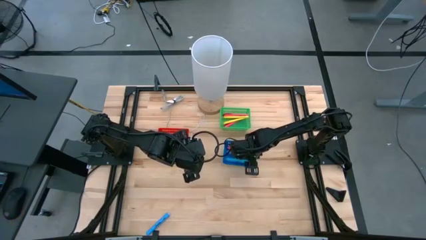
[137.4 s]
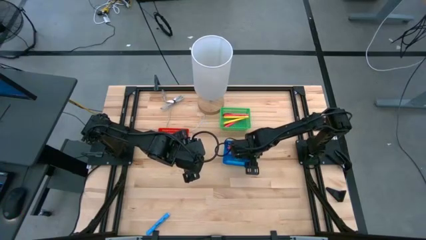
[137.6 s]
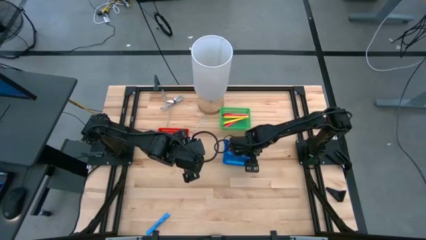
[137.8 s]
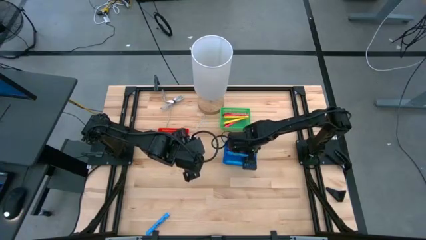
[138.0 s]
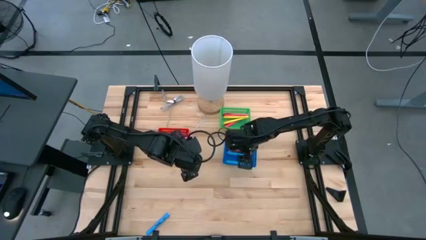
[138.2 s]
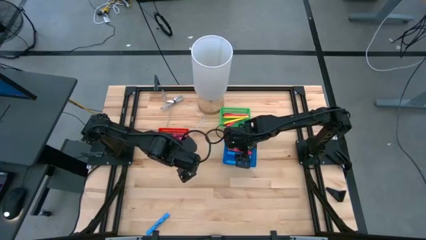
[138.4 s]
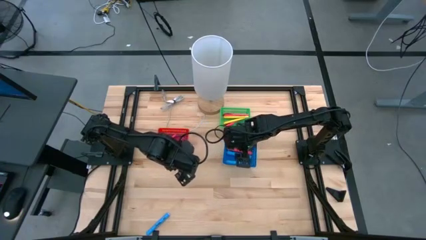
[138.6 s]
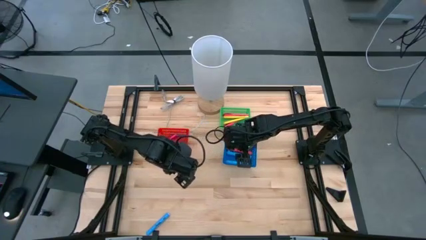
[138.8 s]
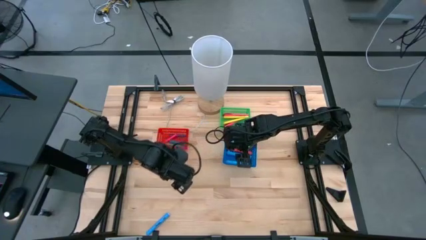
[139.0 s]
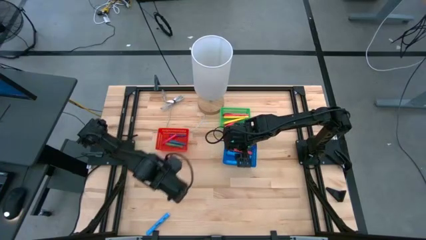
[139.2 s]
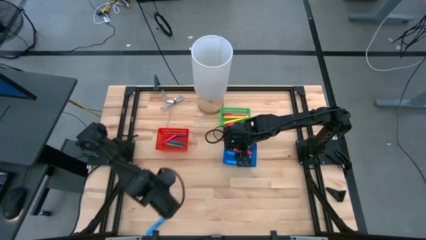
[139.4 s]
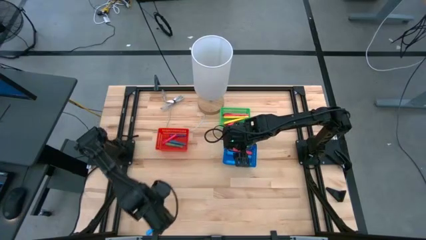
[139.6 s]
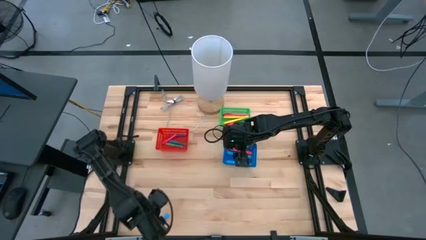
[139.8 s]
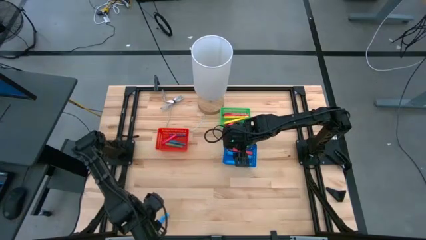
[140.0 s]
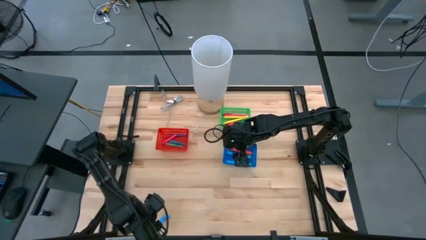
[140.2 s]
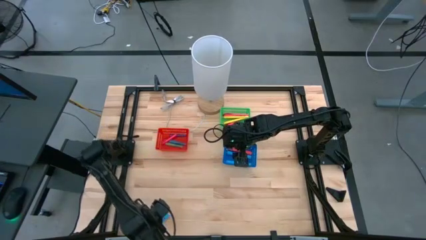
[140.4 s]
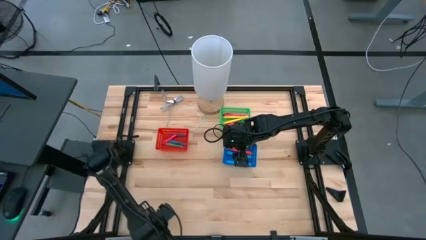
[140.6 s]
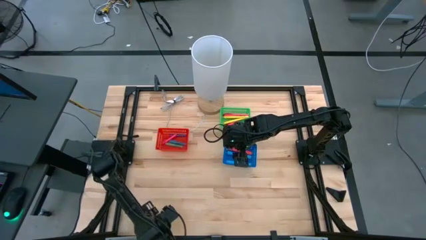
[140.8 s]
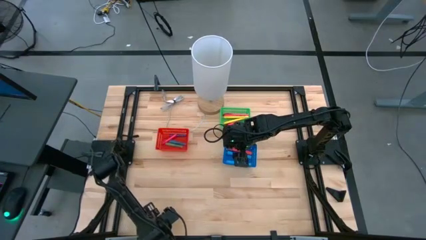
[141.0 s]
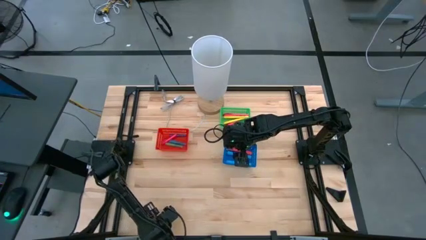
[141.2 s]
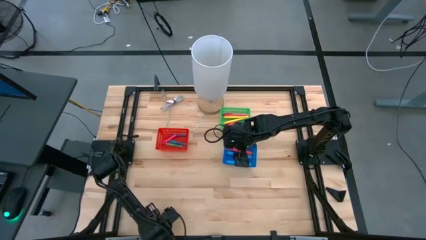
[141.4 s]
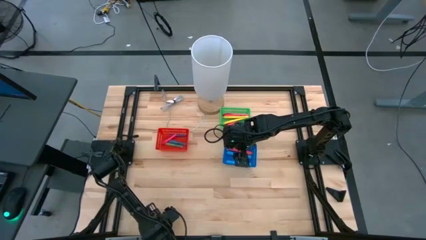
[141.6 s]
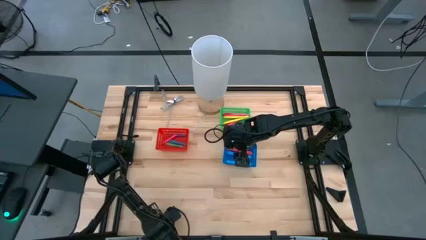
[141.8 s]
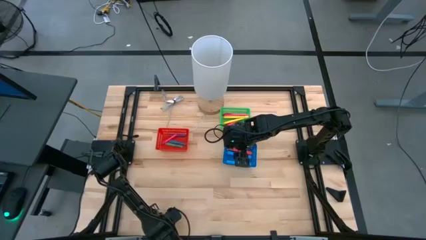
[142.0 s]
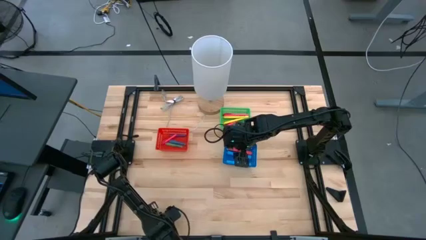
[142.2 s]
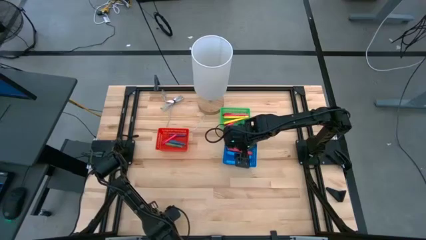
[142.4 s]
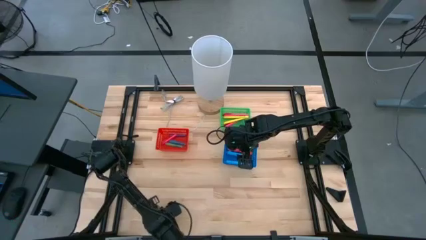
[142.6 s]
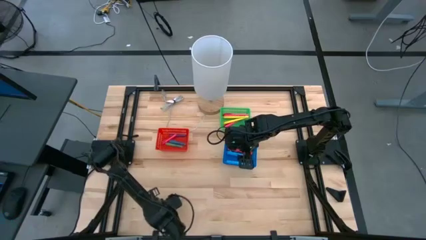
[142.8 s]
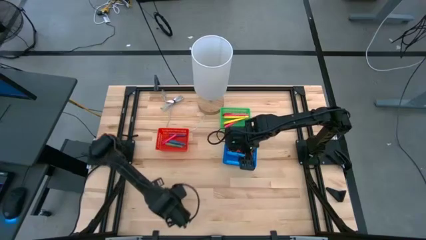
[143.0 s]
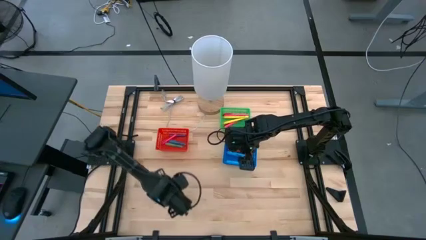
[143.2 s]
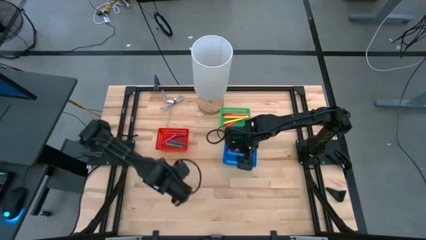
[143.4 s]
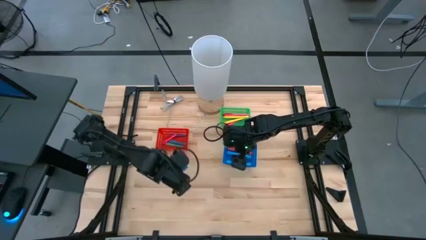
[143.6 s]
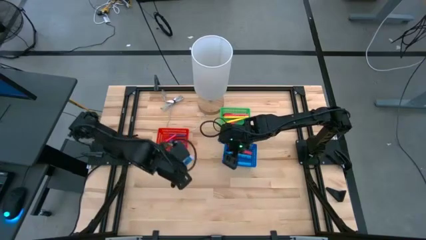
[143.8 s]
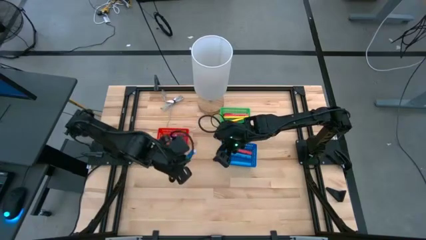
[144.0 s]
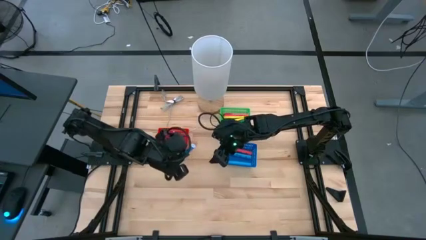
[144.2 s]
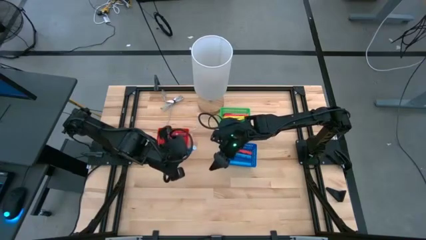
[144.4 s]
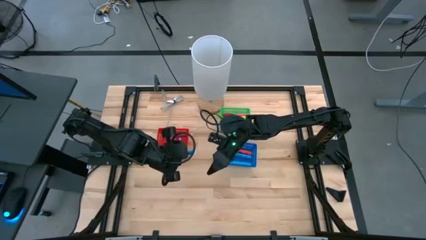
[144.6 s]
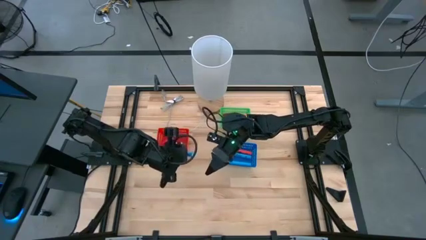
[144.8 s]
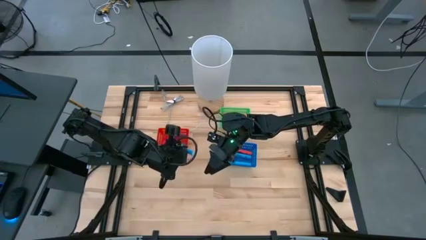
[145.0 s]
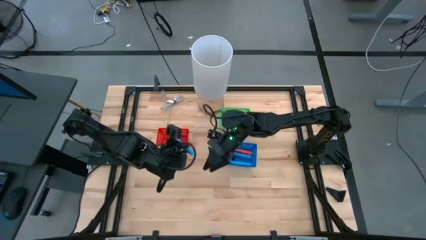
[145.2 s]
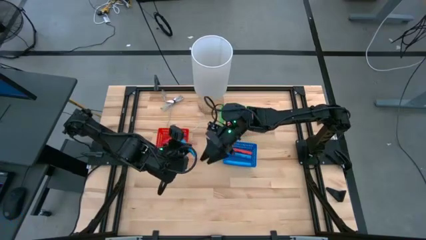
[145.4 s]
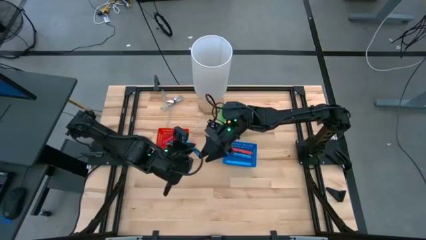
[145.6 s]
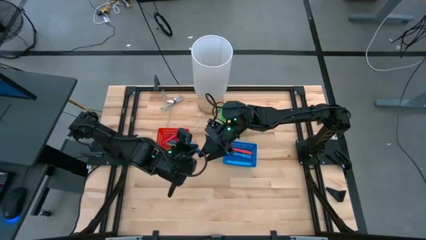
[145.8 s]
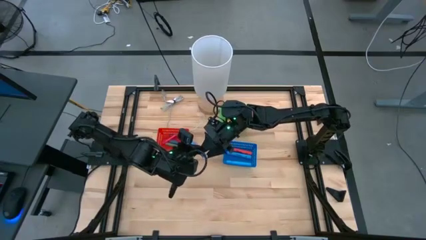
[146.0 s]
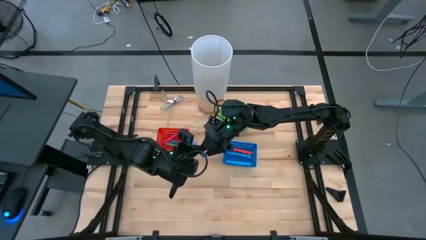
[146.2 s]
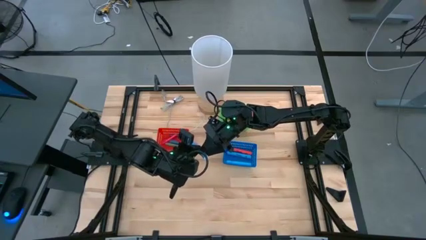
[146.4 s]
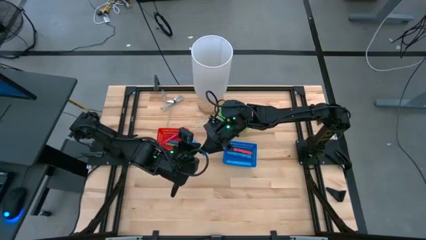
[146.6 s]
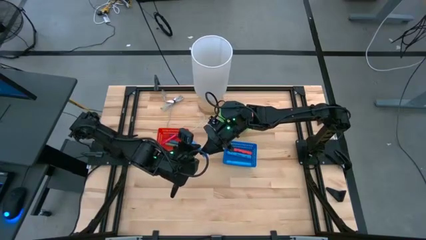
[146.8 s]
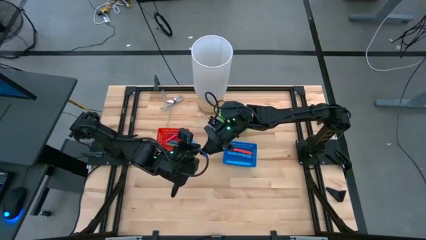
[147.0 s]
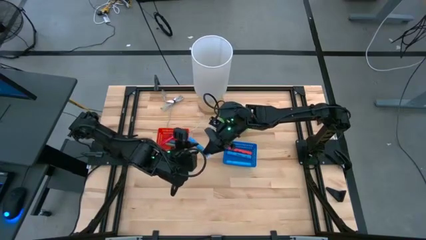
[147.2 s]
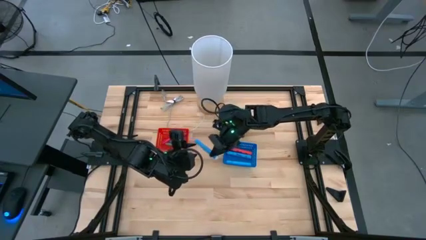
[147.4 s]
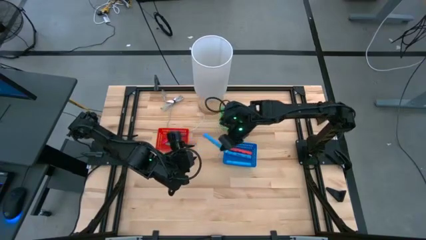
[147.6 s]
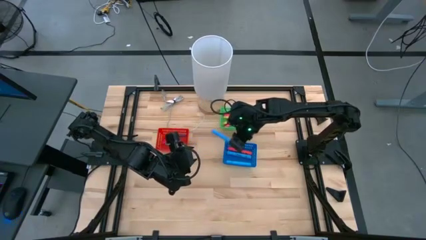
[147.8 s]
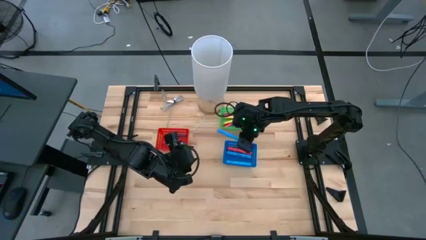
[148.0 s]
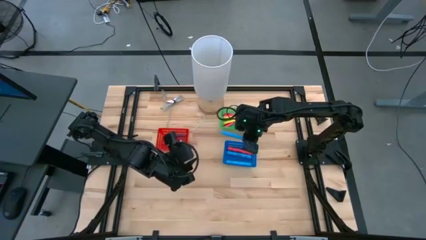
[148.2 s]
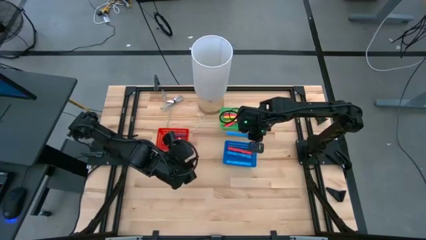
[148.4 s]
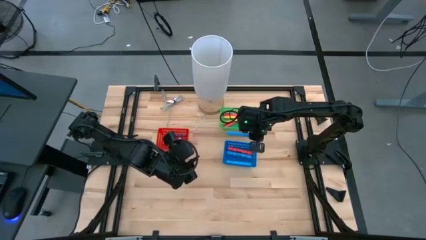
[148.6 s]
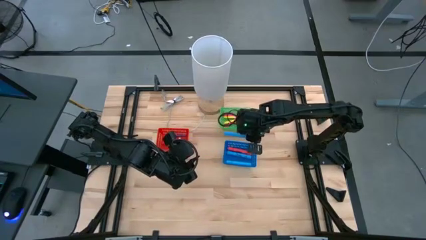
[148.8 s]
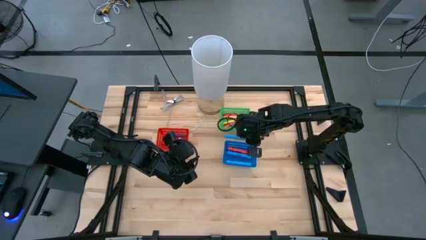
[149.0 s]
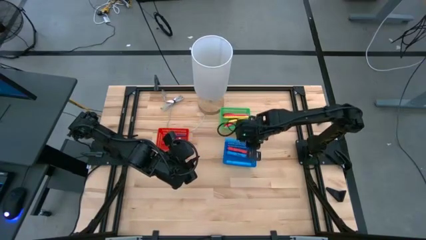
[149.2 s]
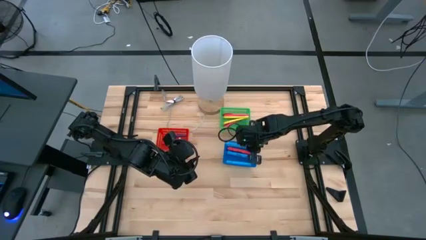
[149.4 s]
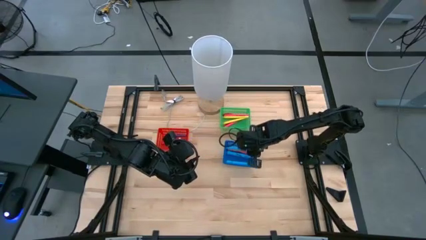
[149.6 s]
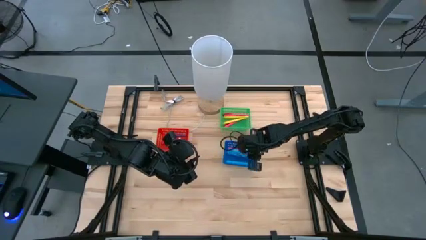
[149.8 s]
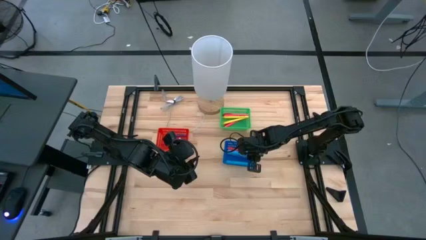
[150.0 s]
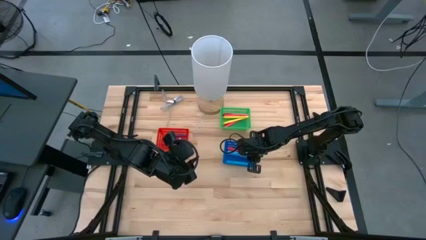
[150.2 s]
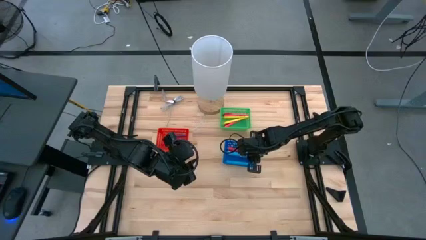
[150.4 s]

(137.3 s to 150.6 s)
Task: Pick & Place Markers
Put the blue highlighter into the blue bin
